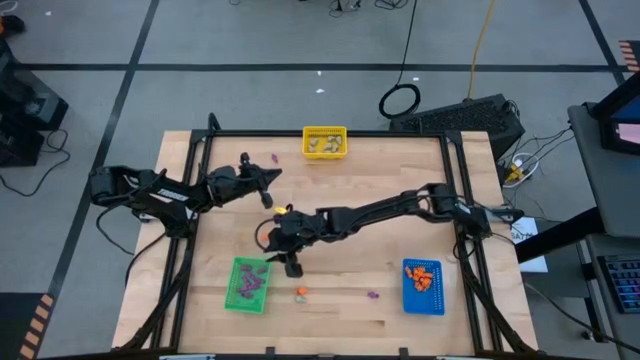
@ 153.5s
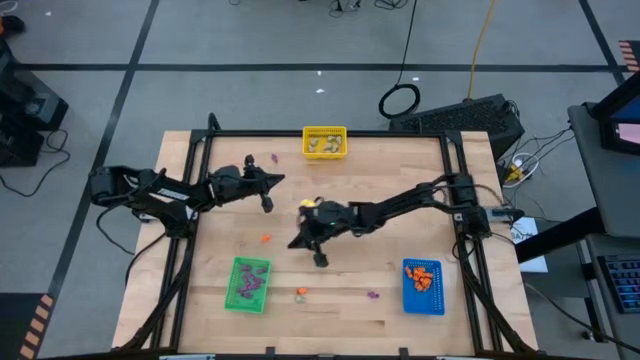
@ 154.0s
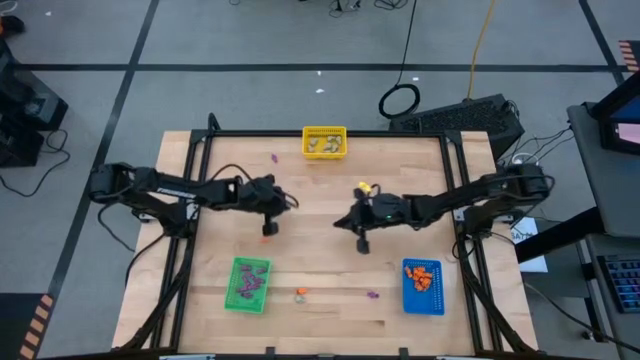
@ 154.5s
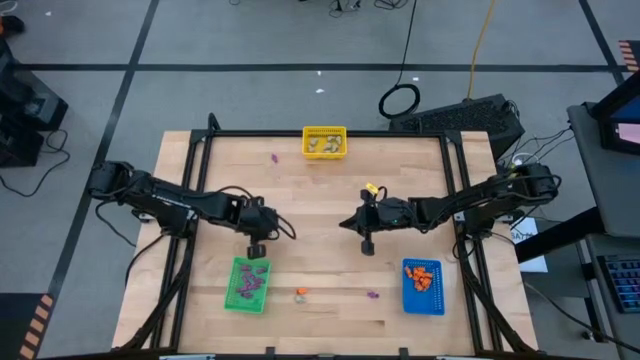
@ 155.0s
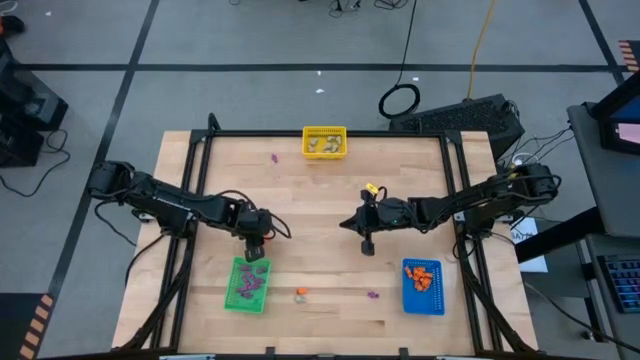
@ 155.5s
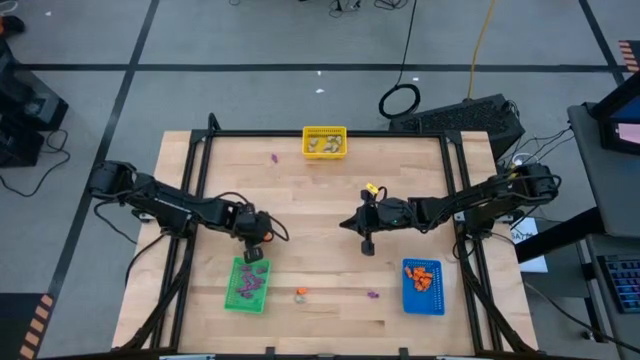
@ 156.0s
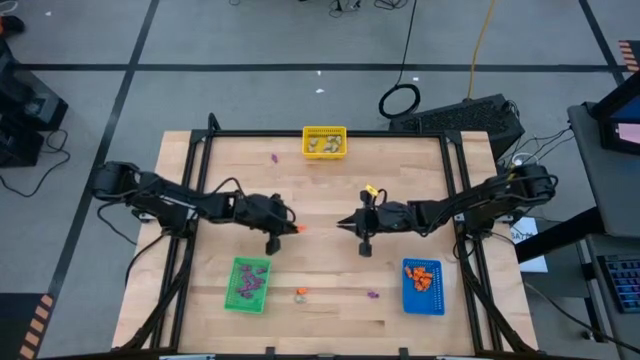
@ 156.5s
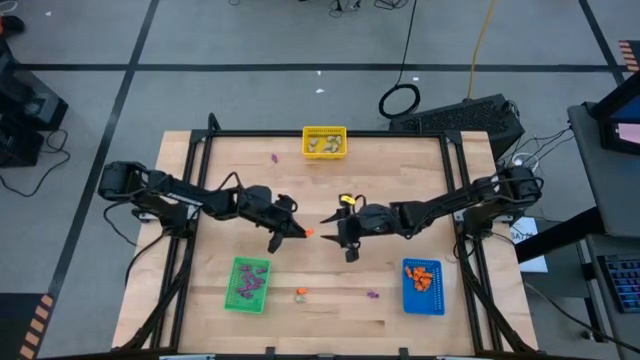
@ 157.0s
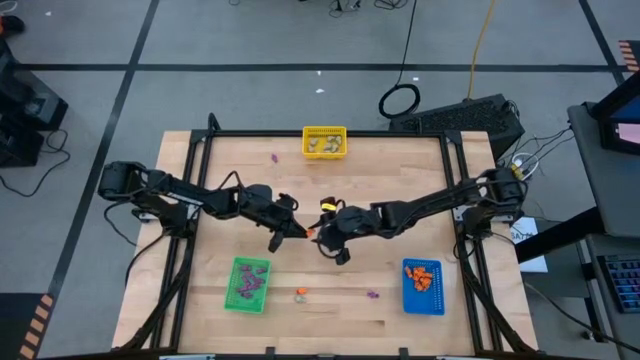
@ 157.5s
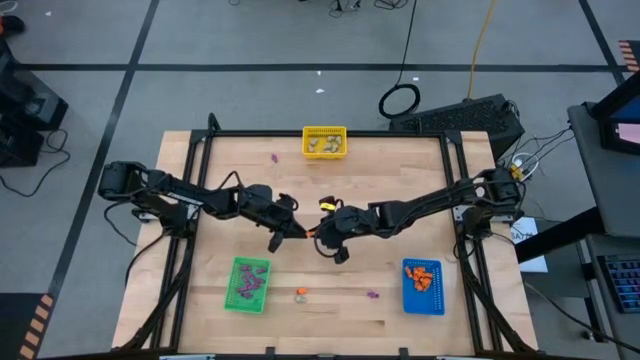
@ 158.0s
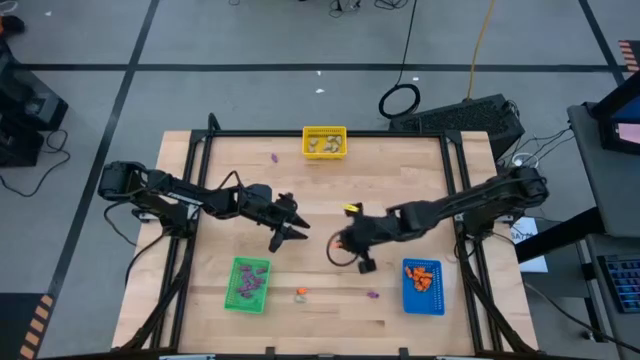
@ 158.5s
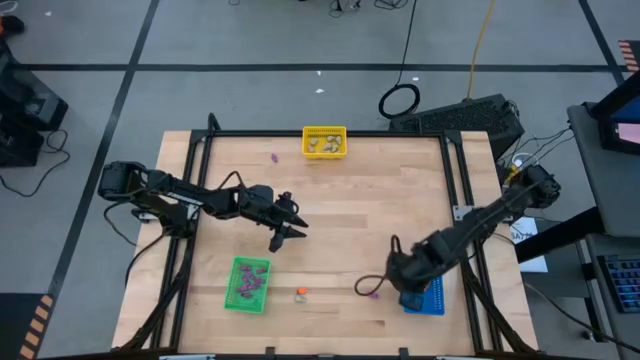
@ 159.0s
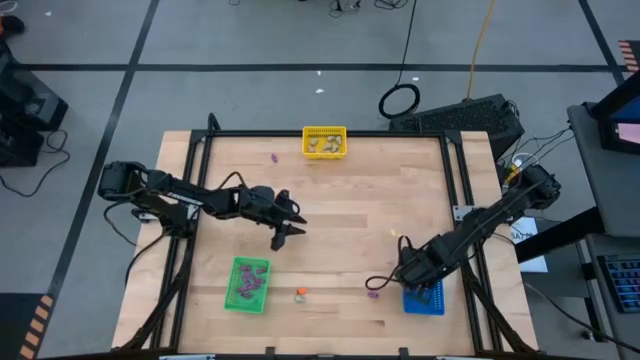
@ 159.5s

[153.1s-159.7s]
Task: Sort Halloween decoration
Put the orange skeleton toy into the blue bin

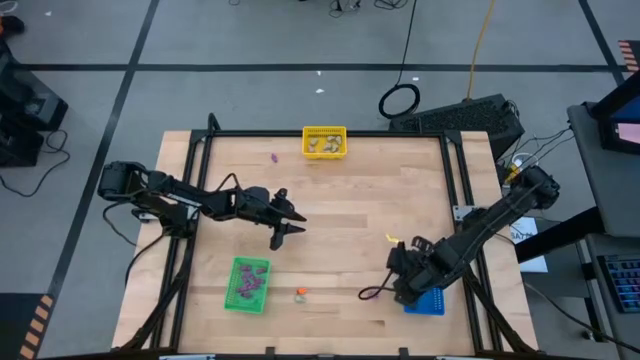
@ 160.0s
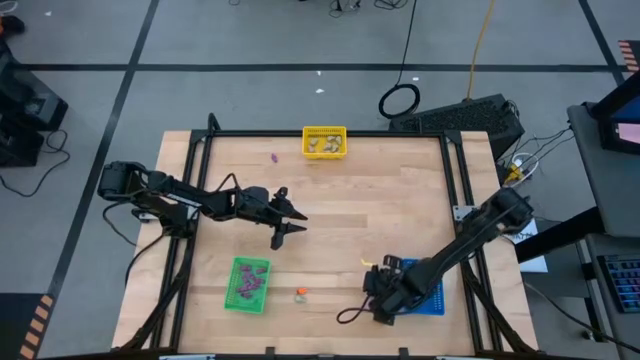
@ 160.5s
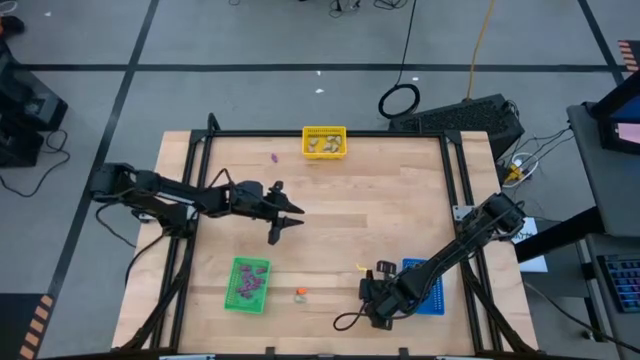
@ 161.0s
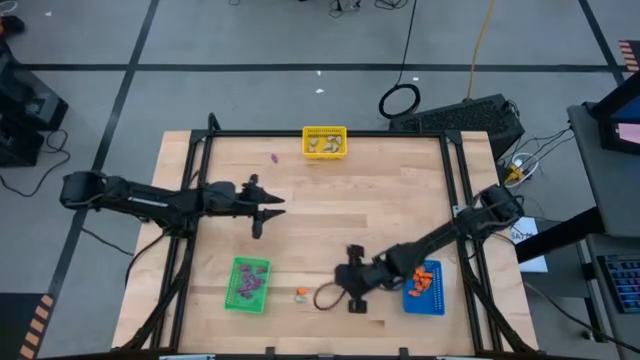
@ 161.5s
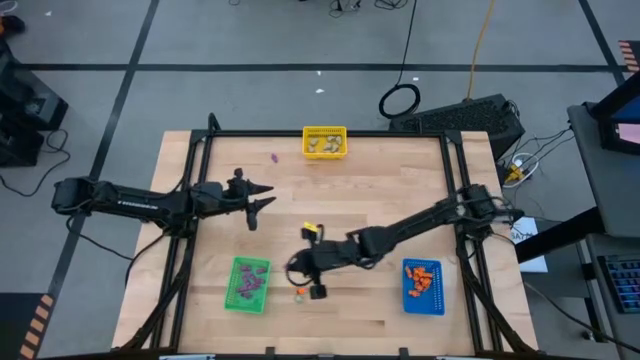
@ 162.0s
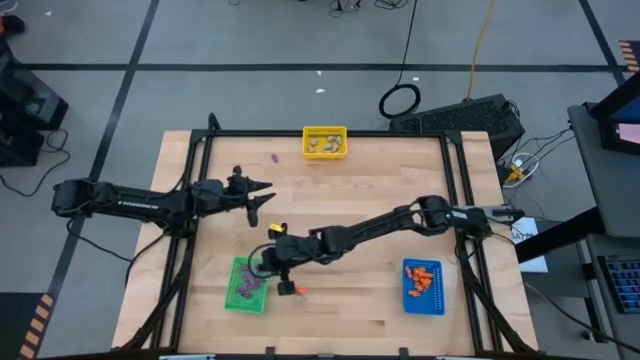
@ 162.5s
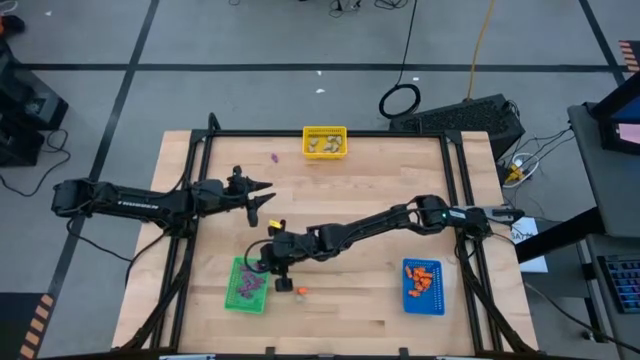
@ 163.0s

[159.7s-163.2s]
Put the purple skeleton toy into the green bin

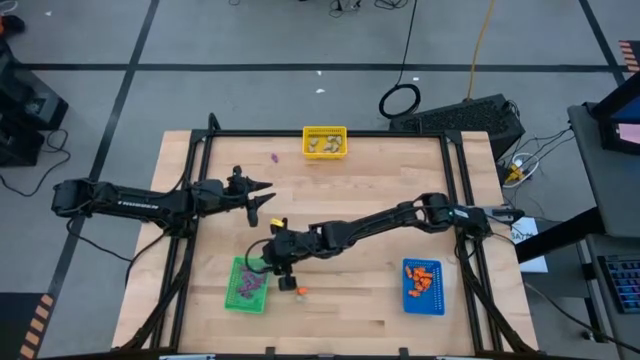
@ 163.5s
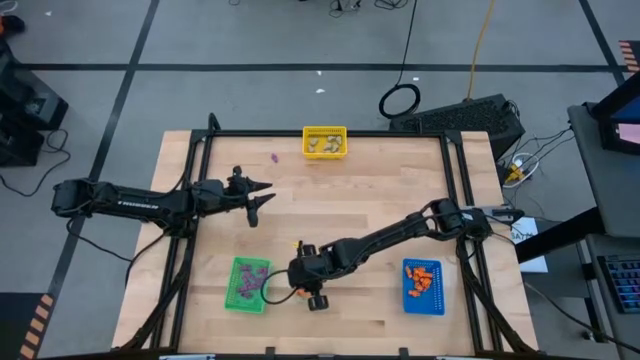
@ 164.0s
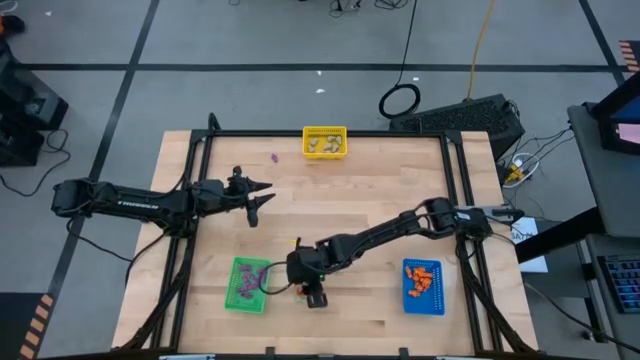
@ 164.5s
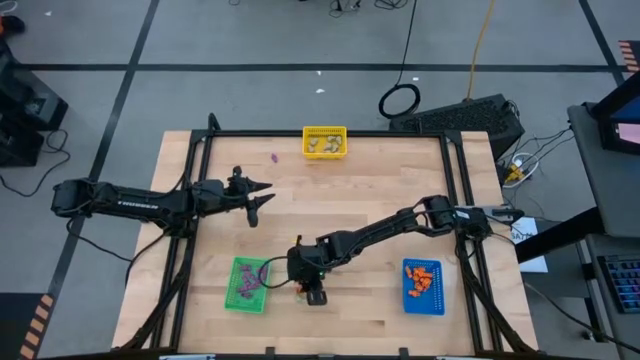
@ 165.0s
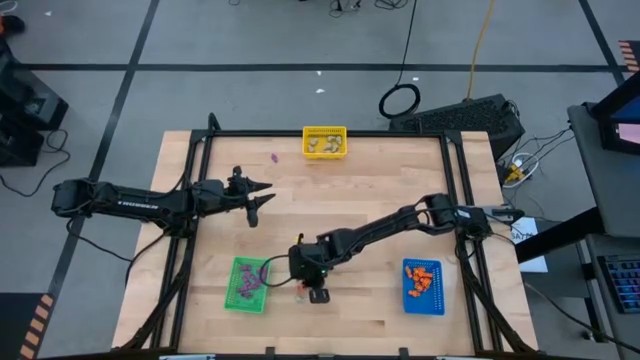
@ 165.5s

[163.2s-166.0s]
Put the orange skeleton toy into the blue bin

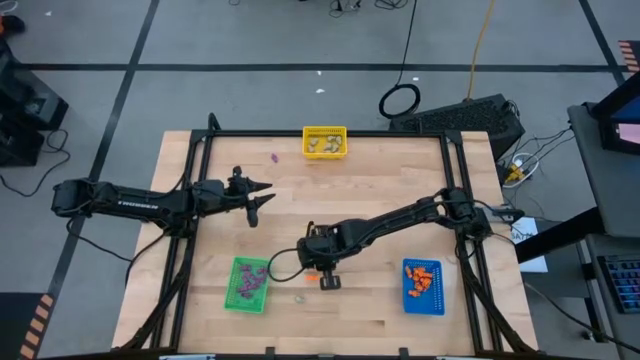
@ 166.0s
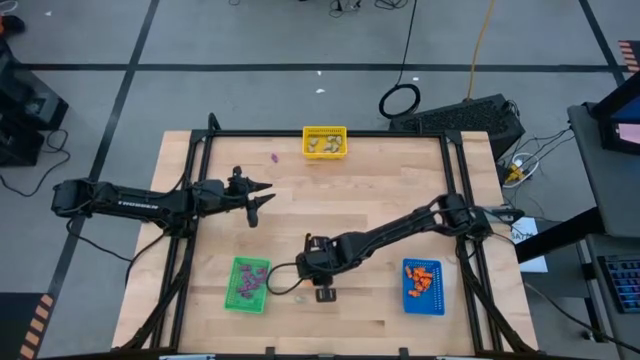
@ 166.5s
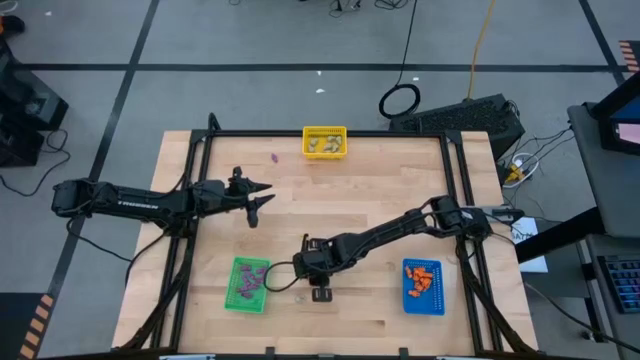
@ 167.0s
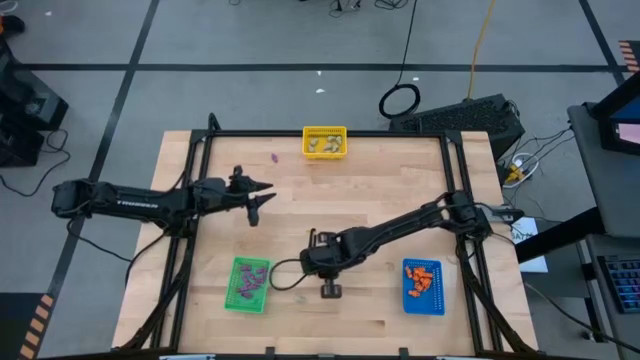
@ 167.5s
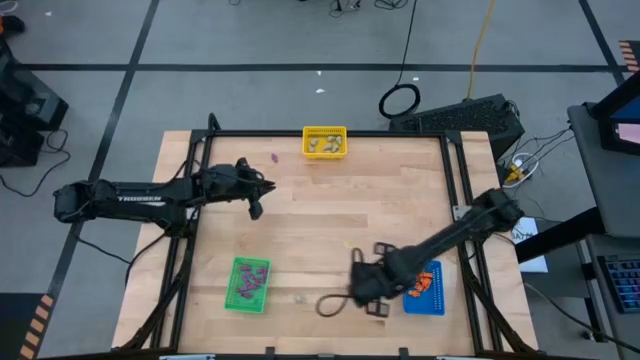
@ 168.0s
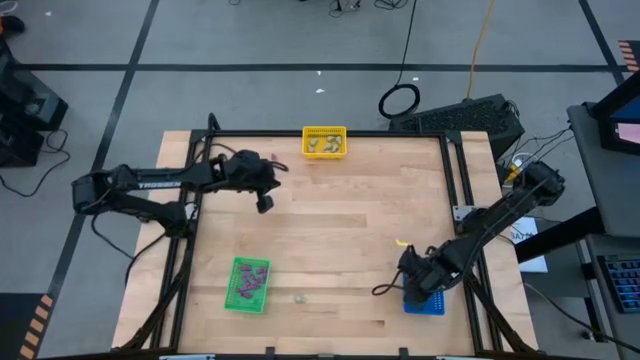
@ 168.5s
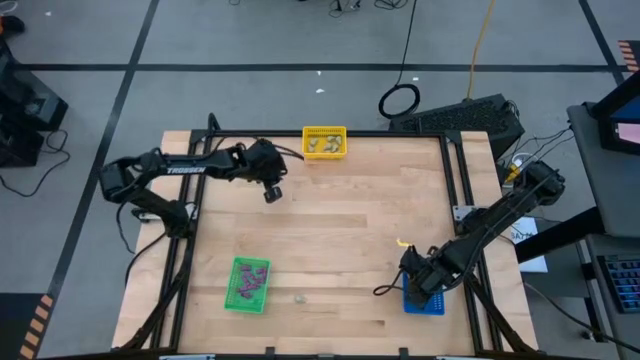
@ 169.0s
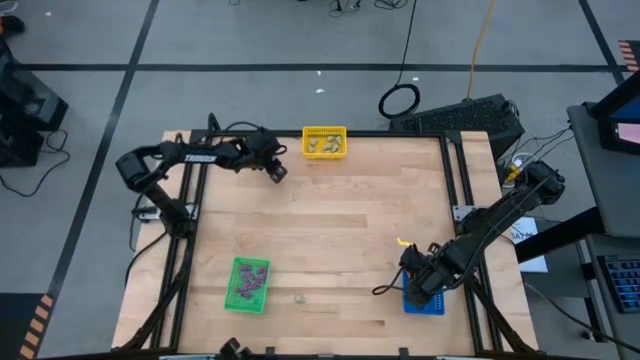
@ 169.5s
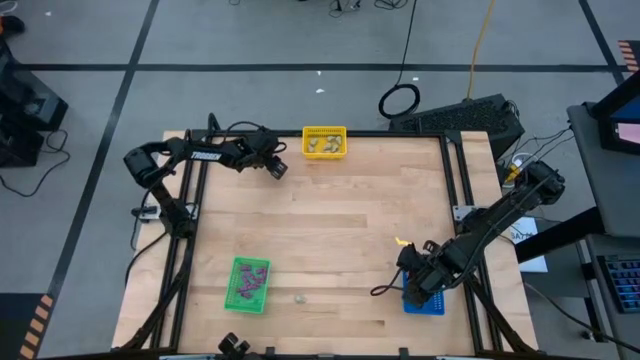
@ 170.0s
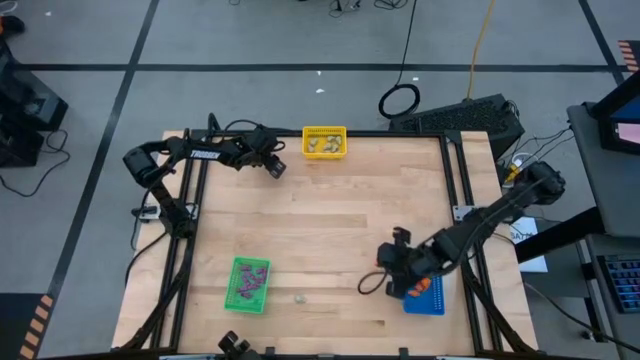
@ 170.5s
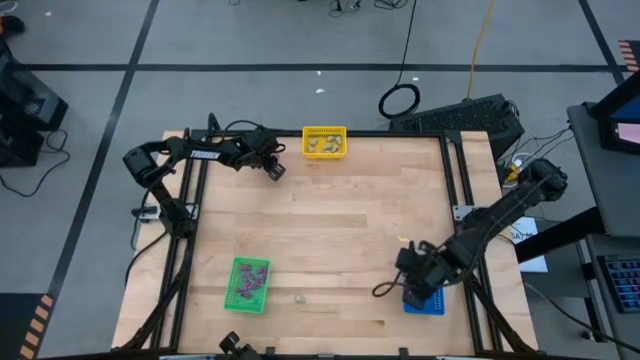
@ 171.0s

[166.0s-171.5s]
Put the orange skeleton toy into the blue bin

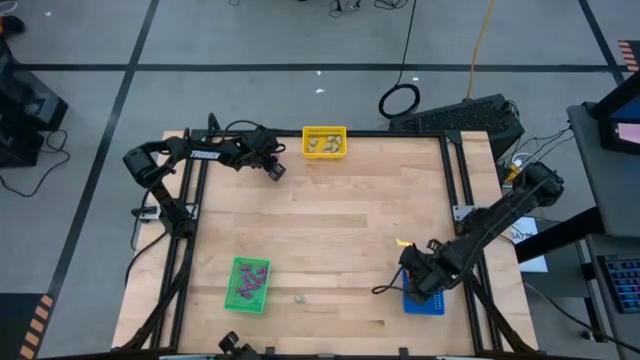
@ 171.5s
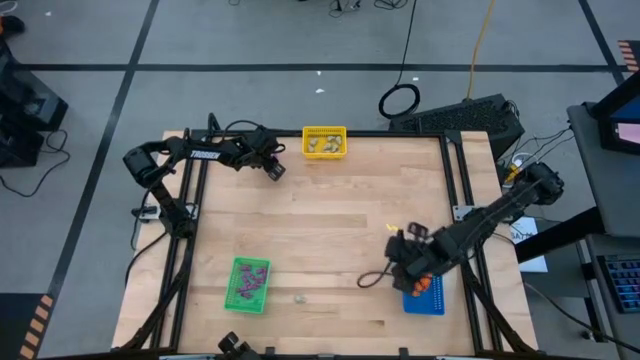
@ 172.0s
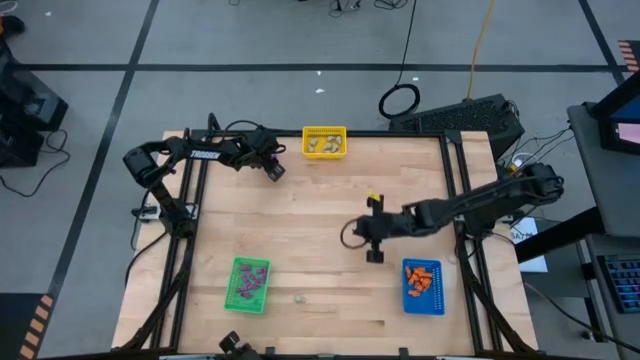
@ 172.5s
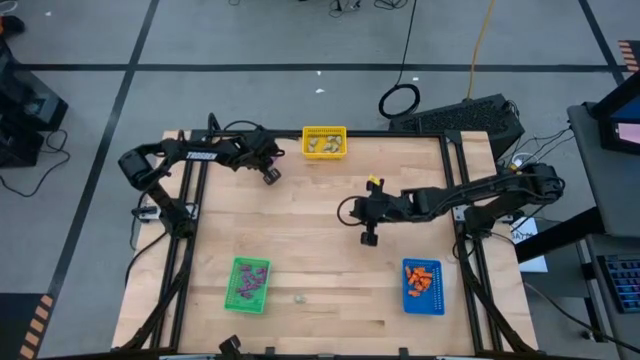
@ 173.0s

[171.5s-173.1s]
Put the purple skeleton toy into the green bin

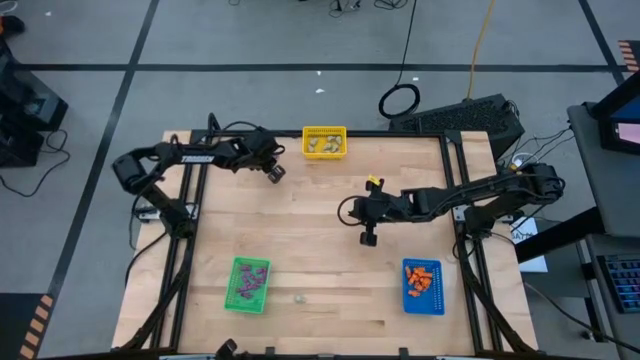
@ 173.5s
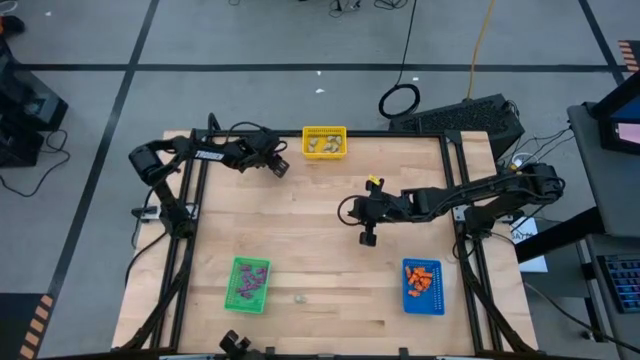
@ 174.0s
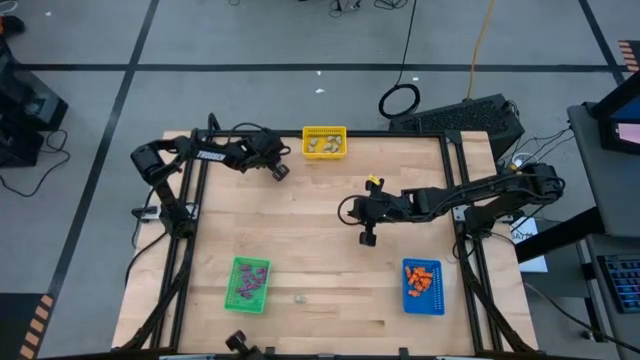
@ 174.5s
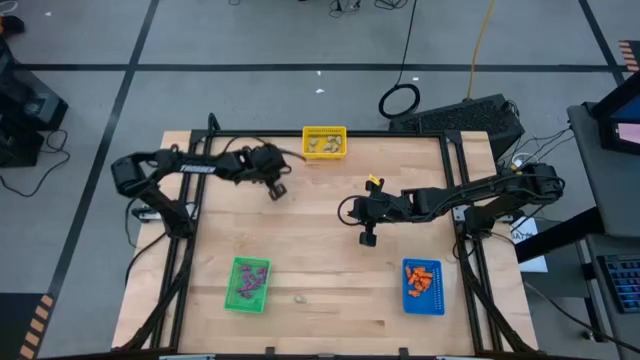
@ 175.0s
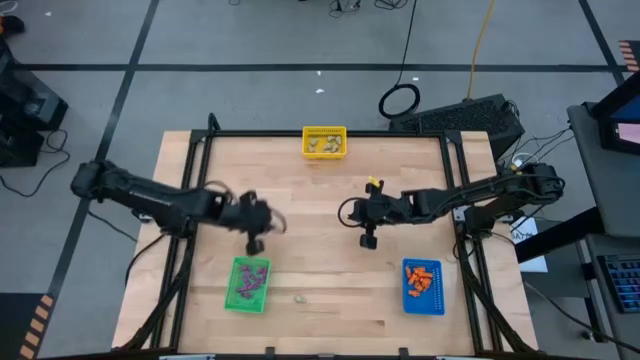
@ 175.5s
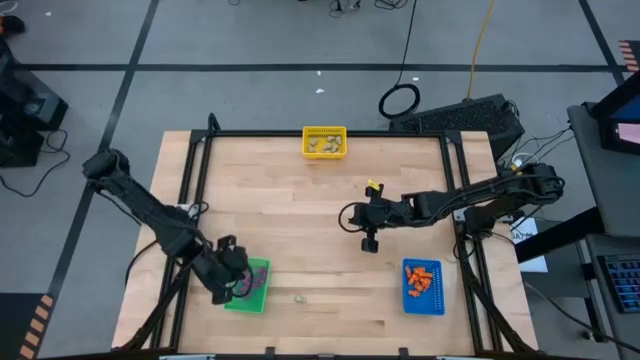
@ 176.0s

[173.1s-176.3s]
Put the purple skeleton toy into the green bin
